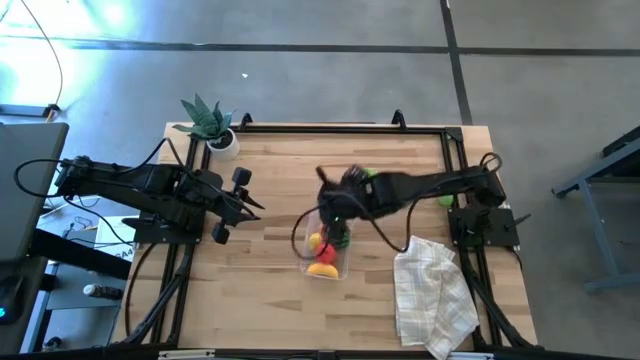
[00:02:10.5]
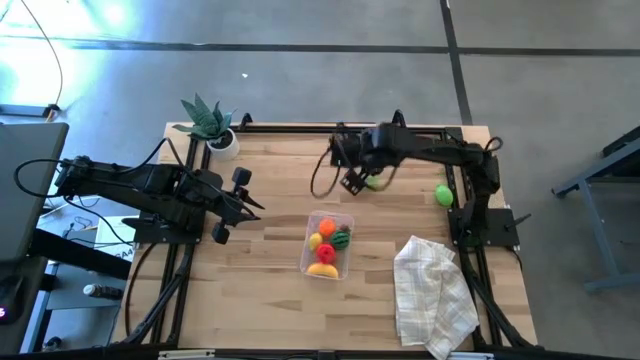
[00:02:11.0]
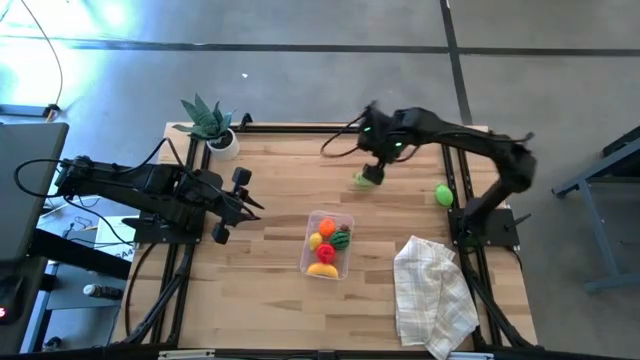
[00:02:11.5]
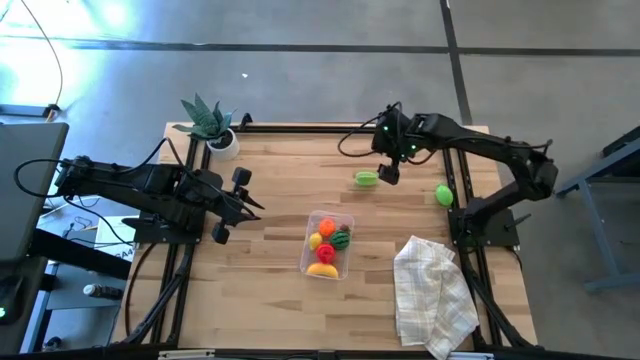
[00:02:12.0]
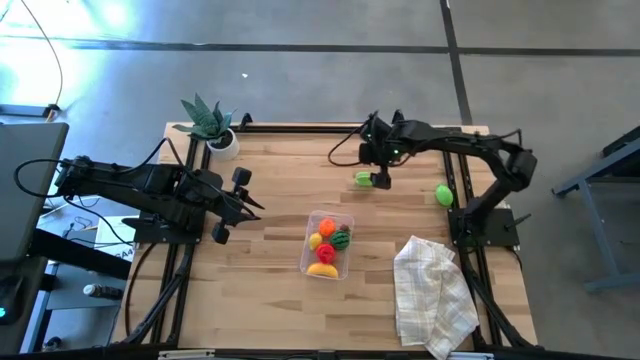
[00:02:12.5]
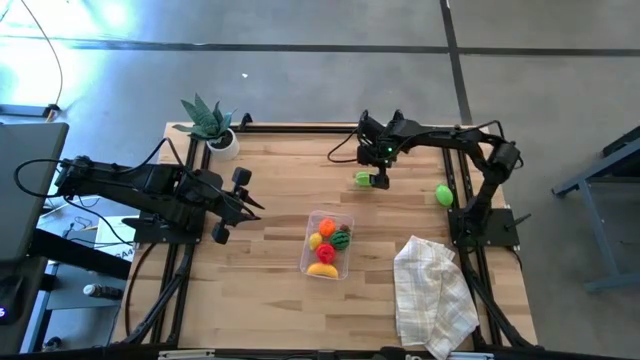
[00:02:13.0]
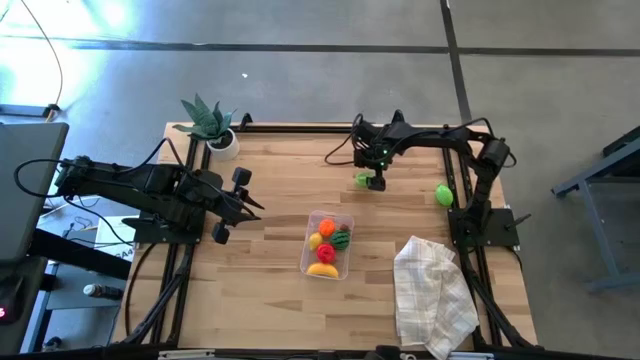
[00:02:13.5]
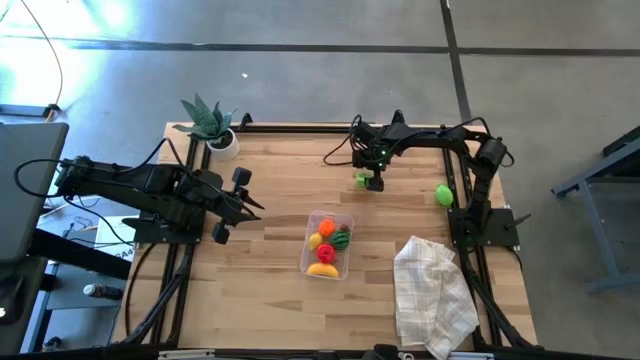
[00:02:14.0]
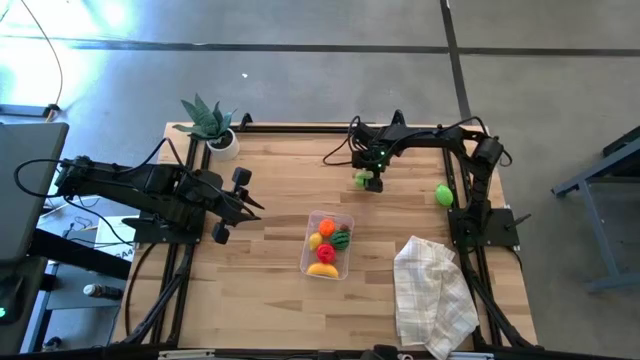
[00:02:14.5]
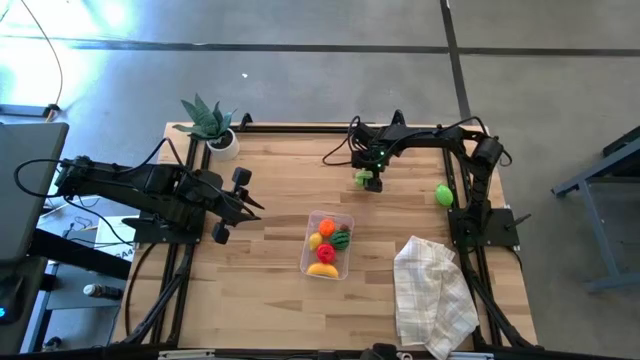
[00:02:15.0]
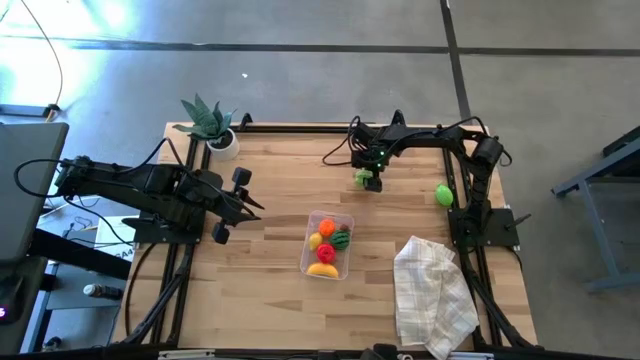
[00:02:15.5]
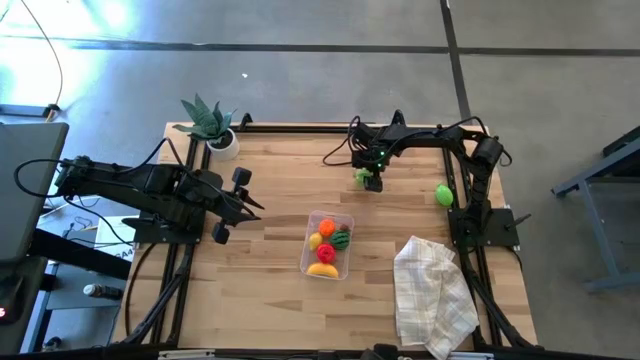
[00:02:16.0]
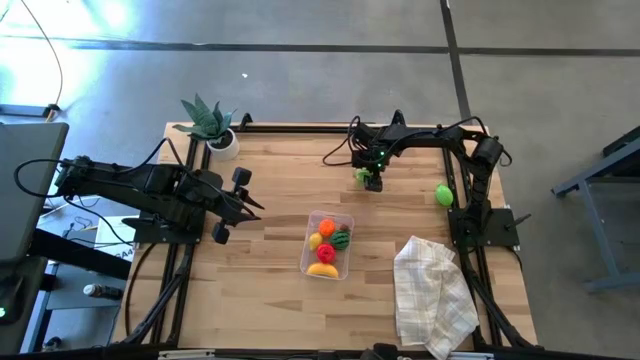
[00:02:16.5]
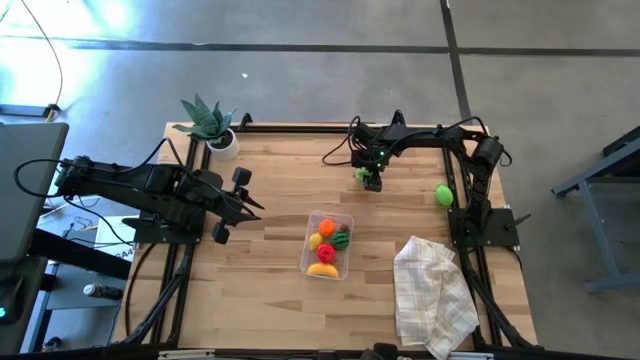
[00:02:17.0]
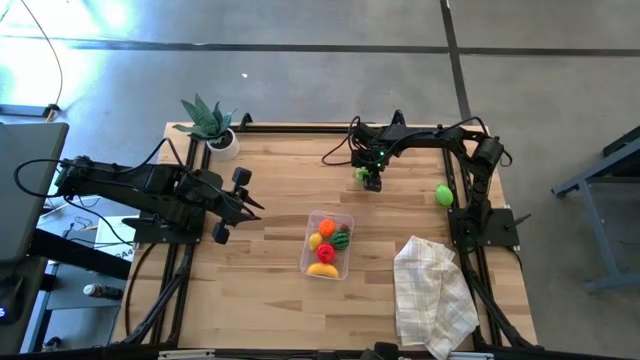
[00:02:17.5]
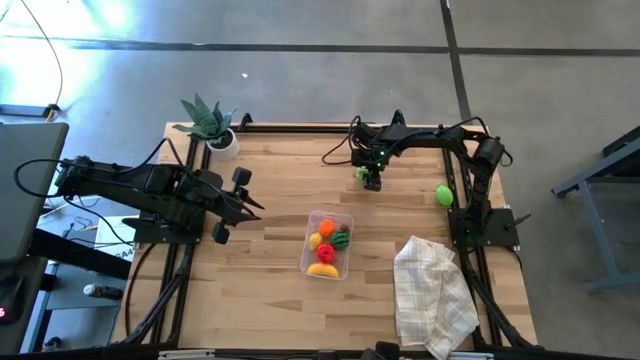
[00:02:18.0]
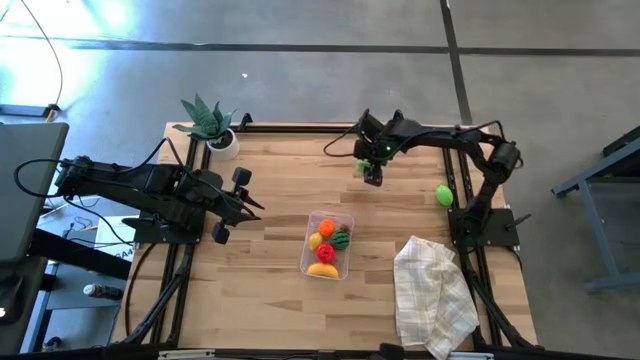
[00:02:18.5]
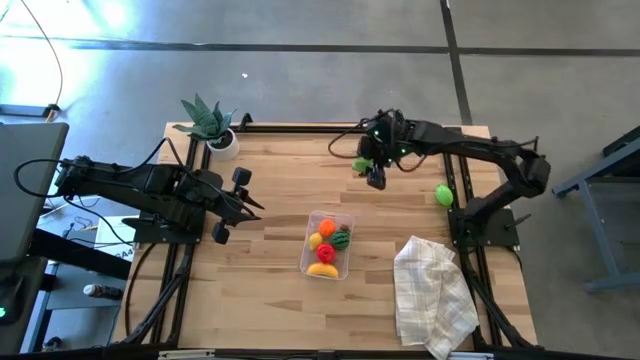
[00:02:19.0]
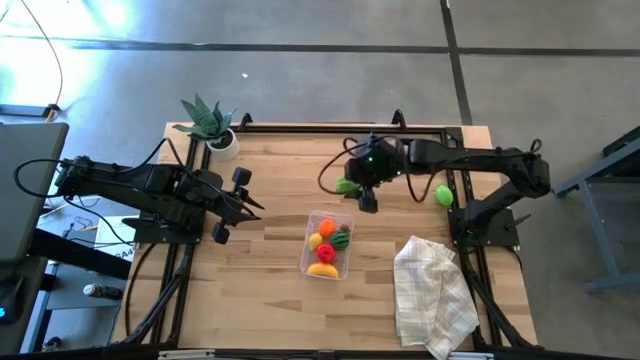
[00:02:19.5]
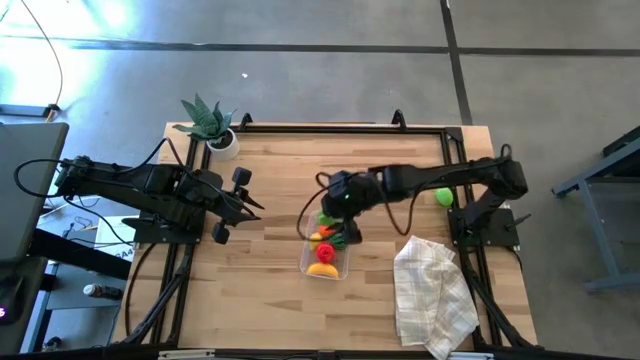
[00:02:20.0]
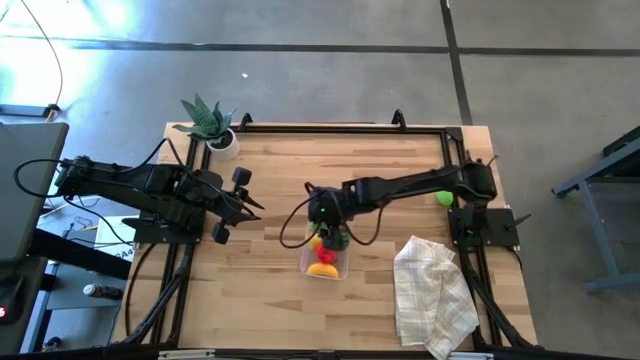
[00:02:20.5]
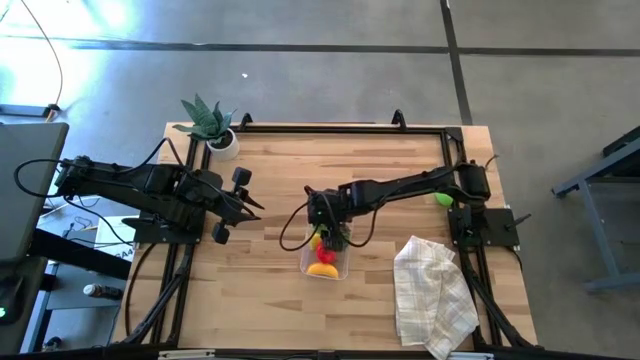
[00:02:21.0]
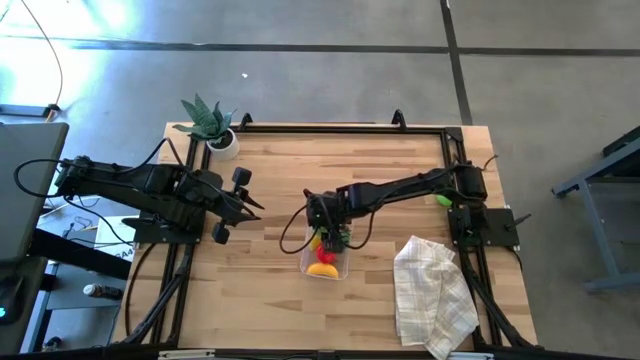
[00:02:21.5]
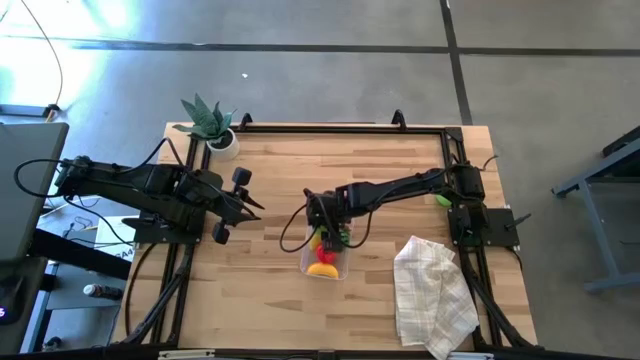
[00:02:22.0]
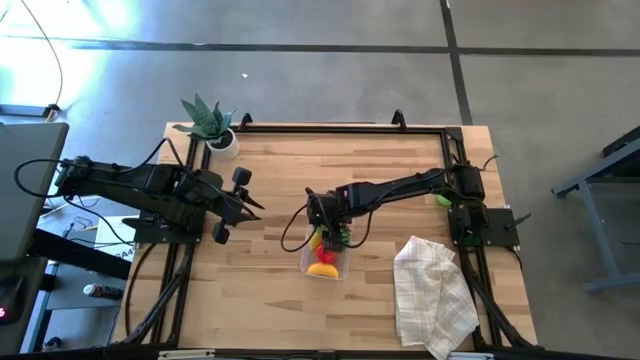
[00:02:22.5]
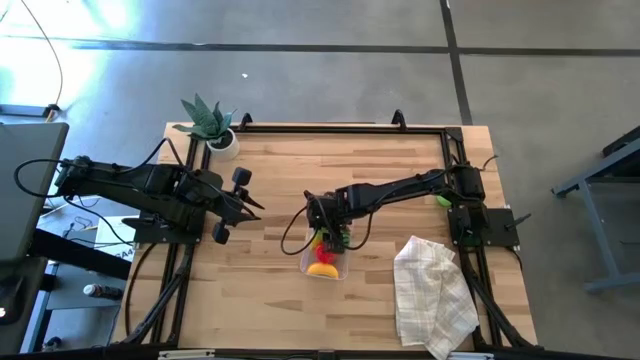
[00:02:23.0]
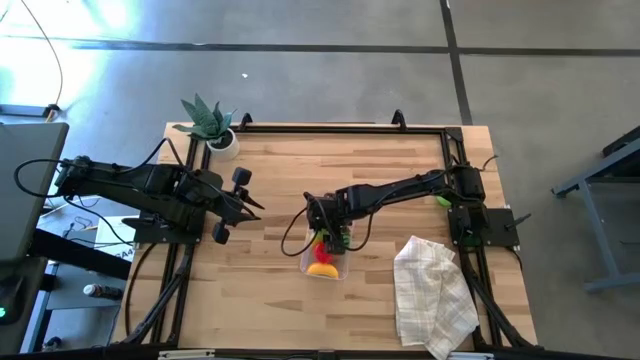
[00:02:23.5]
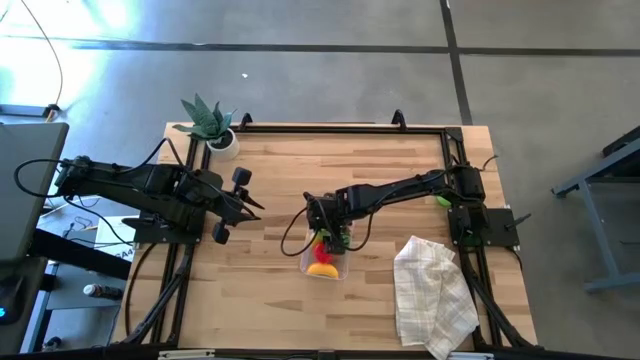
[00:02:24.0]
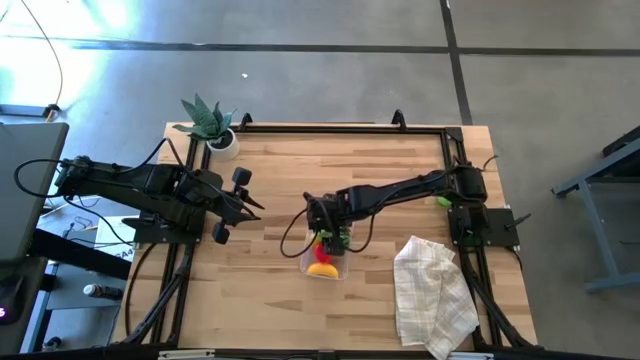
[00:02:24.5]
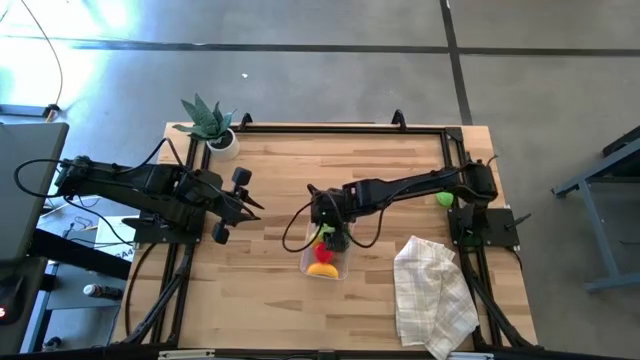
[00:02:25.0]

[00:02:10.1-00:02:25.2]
Task: Pick and placing Produce into tupperware
Put the starfruit into the transparent bin
